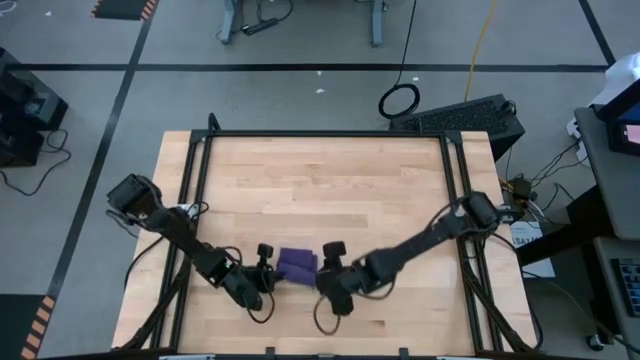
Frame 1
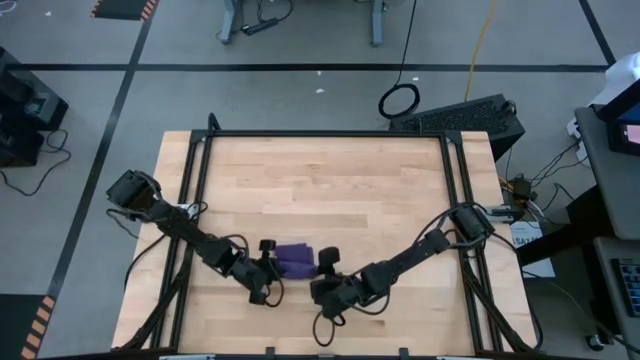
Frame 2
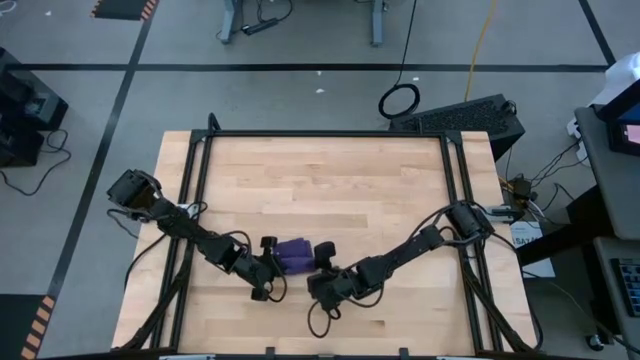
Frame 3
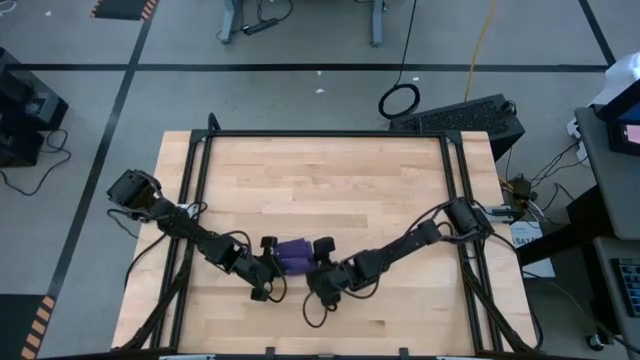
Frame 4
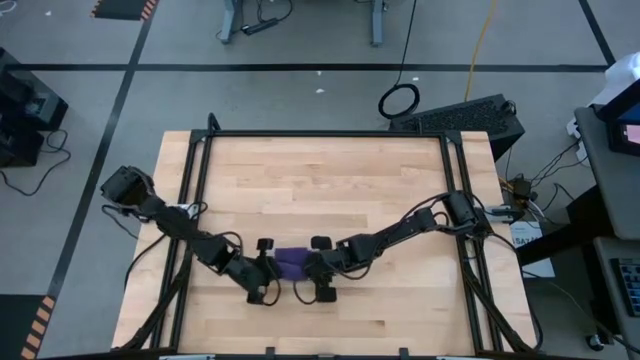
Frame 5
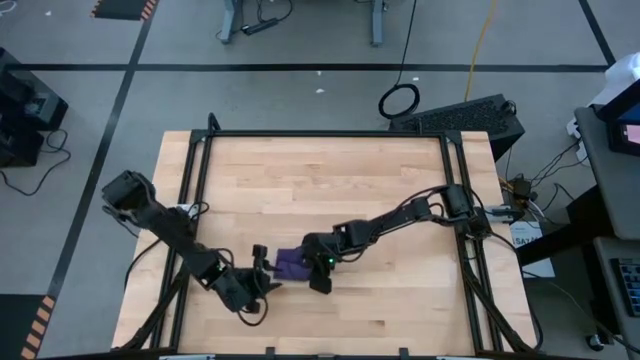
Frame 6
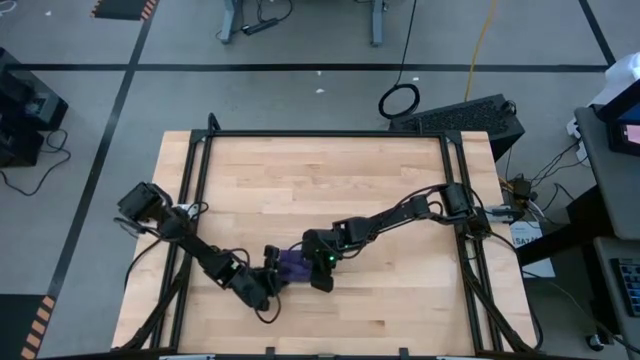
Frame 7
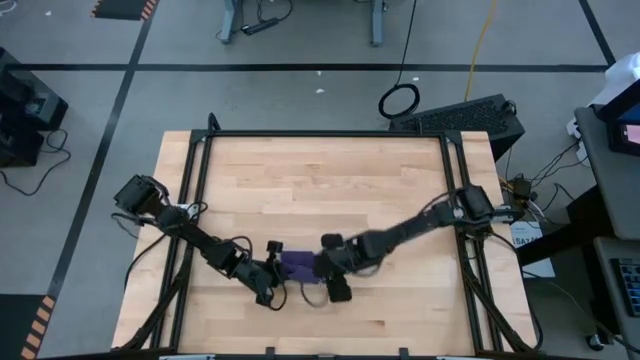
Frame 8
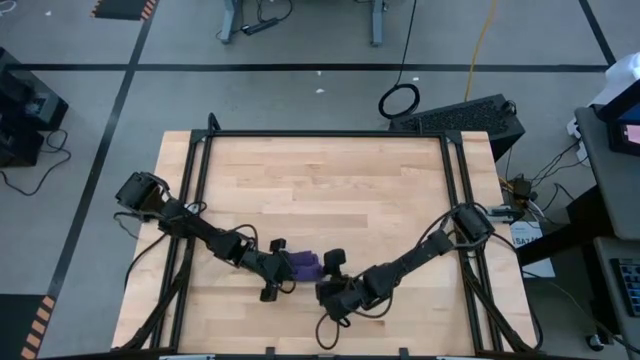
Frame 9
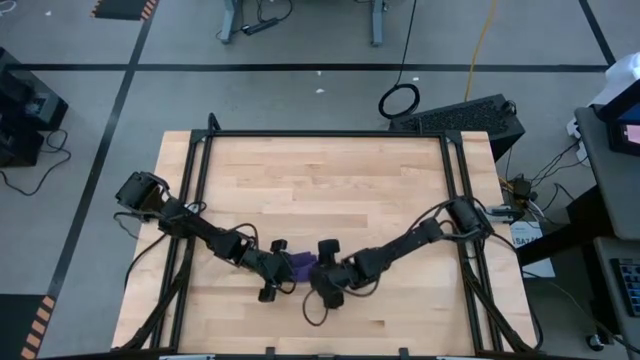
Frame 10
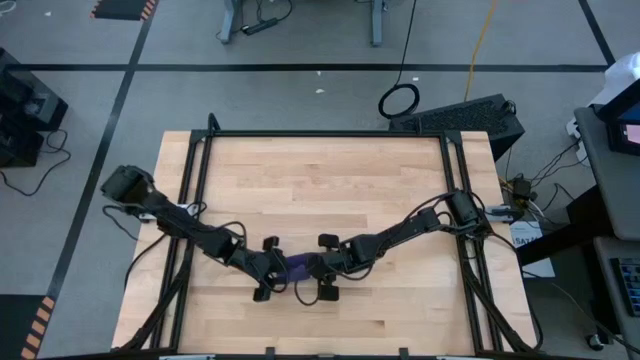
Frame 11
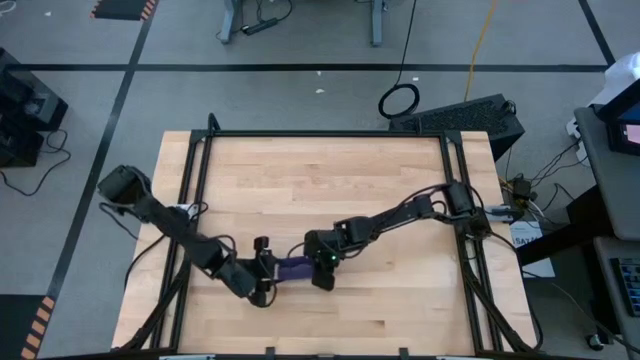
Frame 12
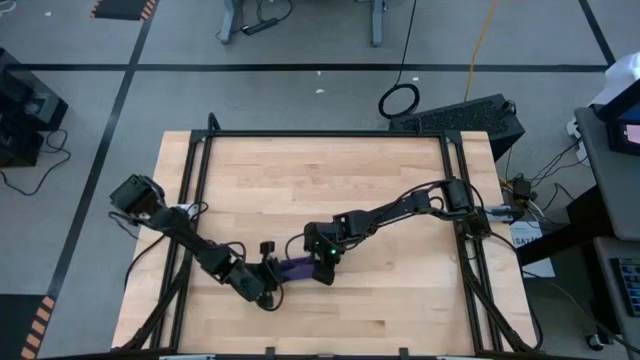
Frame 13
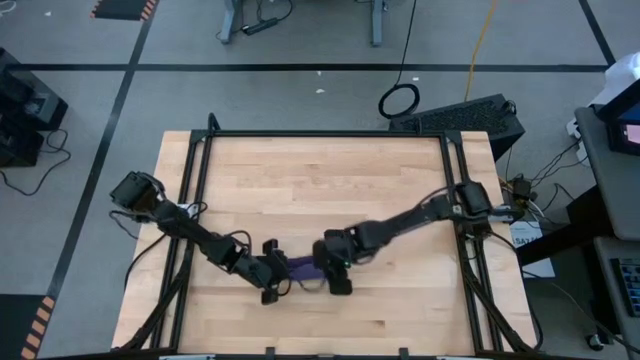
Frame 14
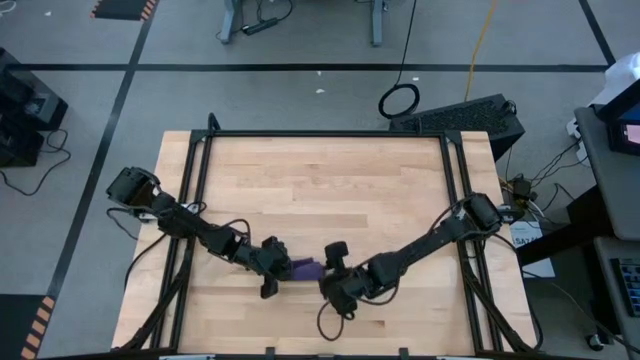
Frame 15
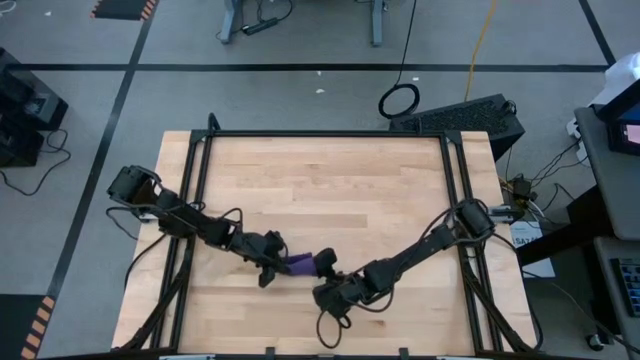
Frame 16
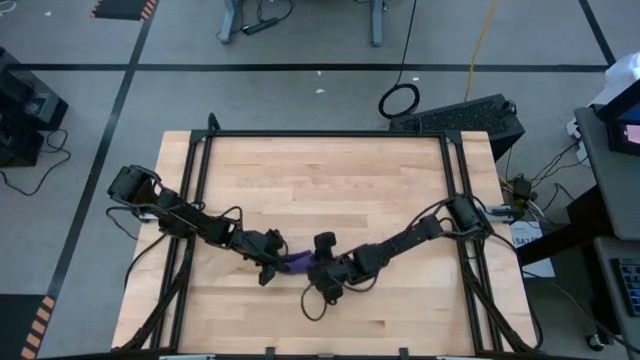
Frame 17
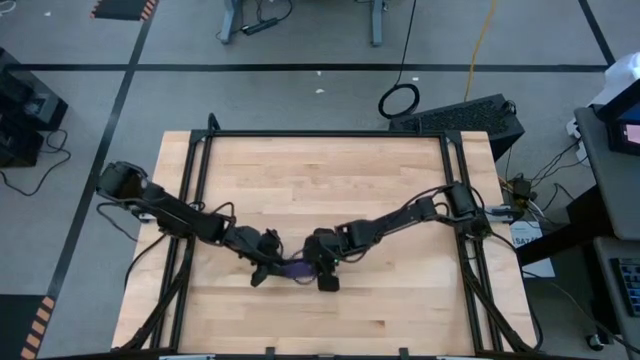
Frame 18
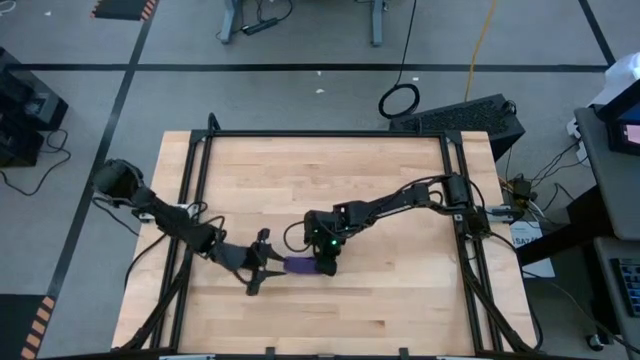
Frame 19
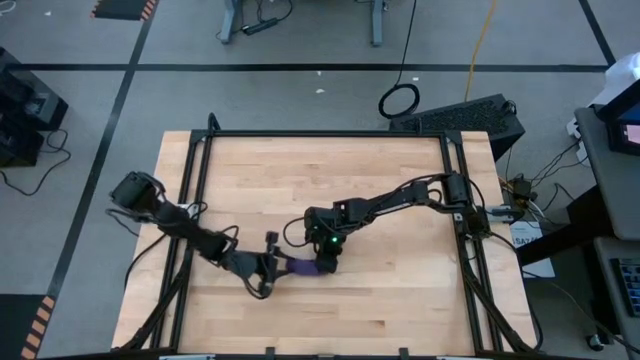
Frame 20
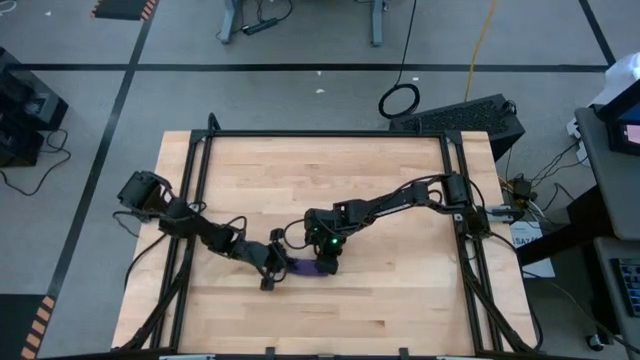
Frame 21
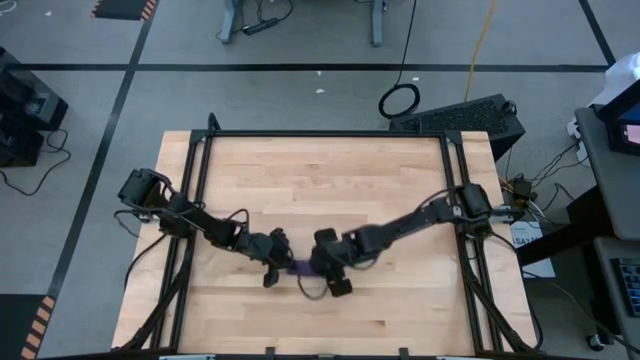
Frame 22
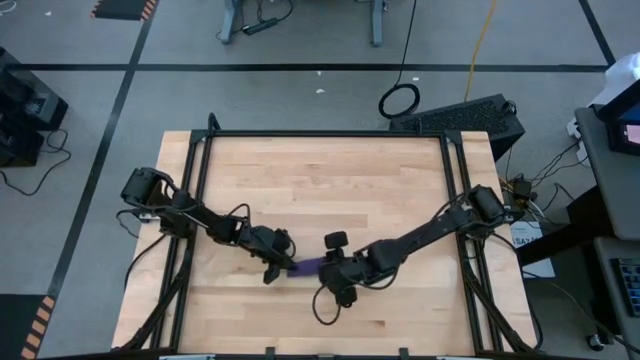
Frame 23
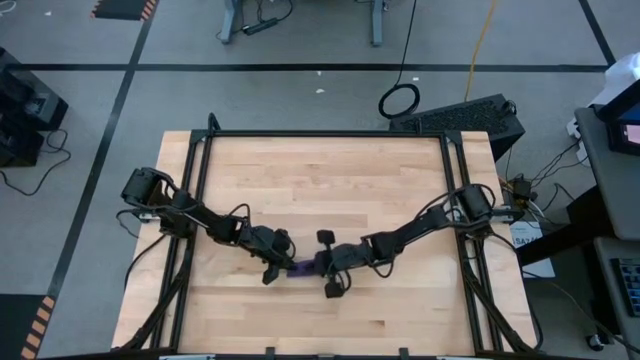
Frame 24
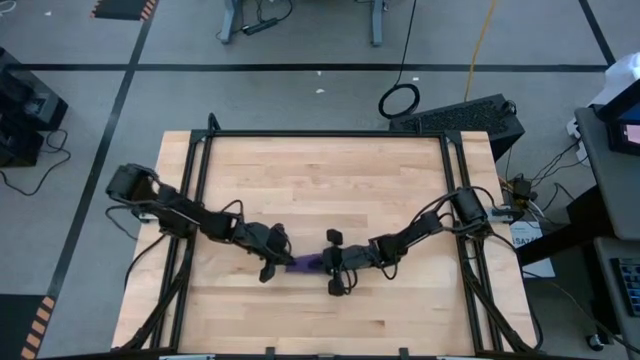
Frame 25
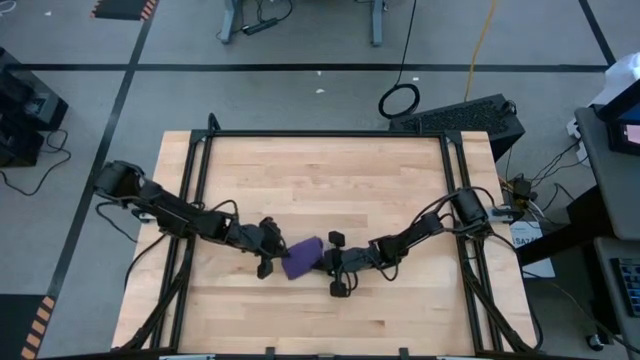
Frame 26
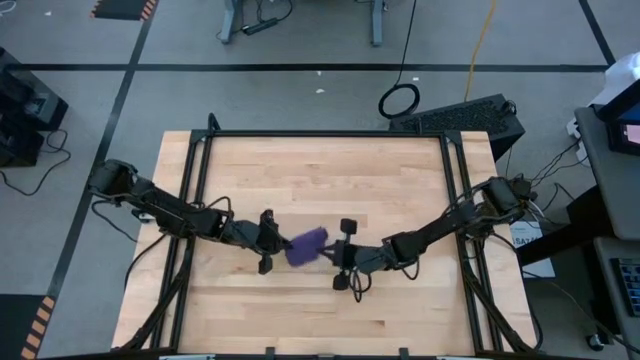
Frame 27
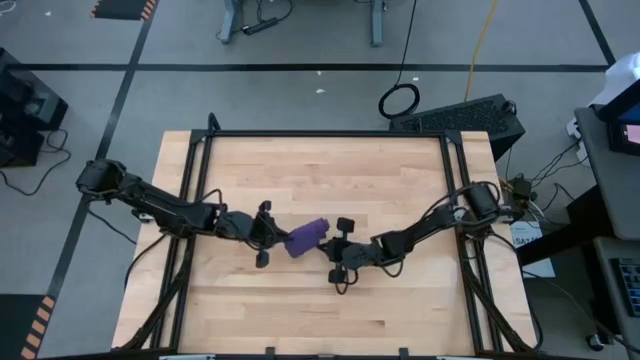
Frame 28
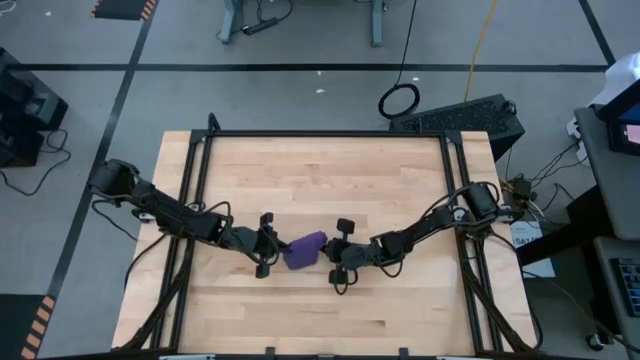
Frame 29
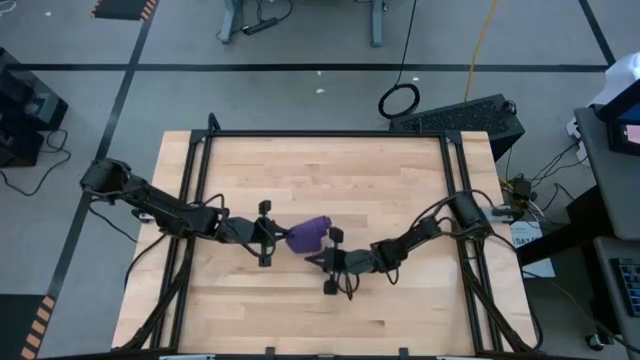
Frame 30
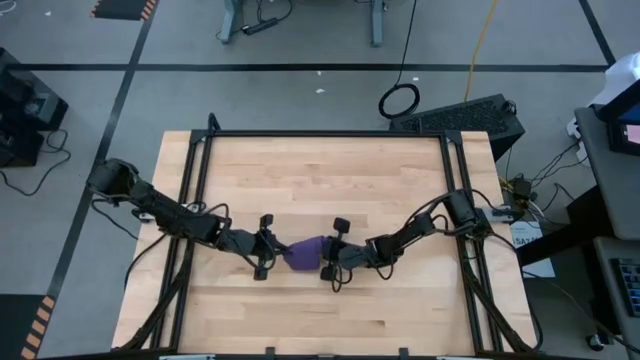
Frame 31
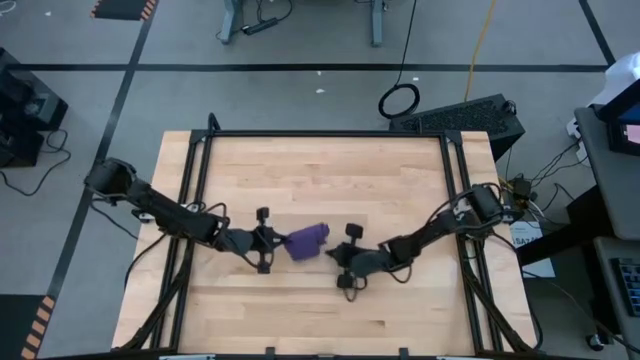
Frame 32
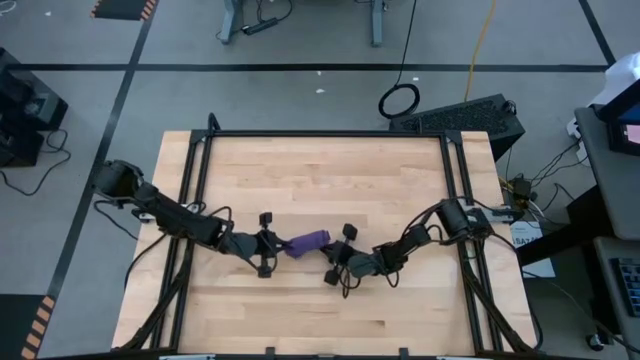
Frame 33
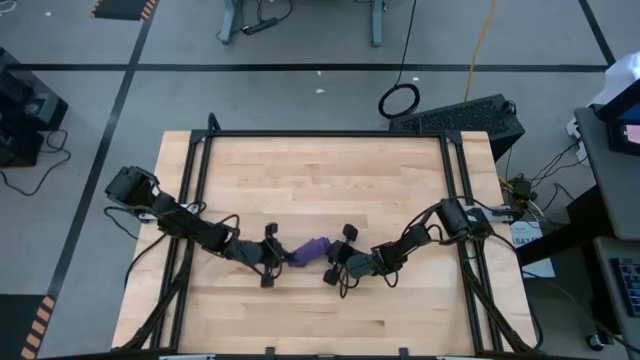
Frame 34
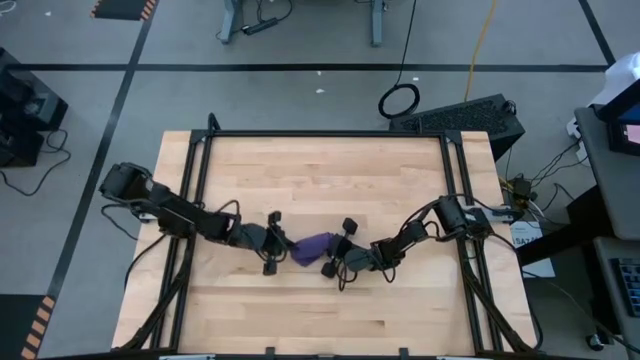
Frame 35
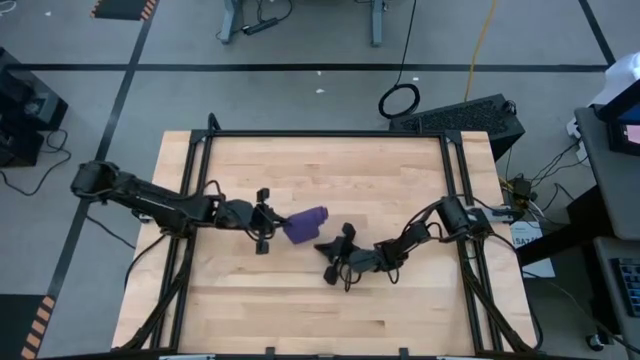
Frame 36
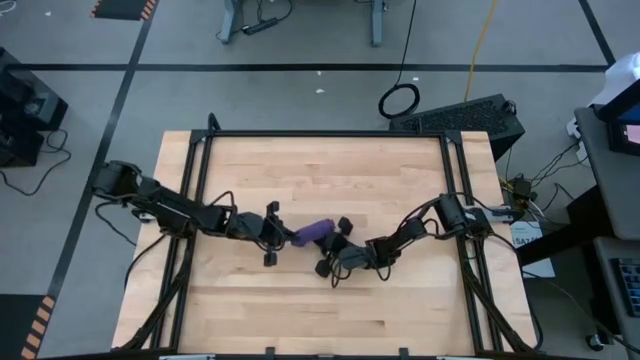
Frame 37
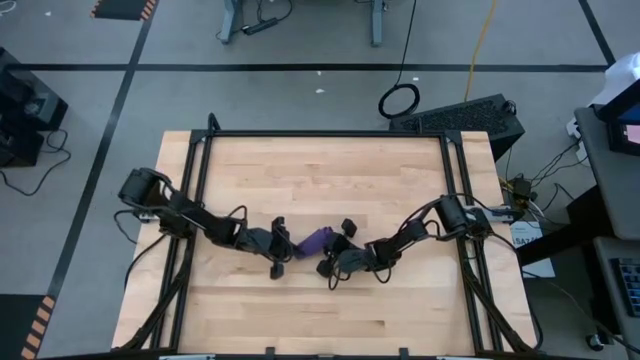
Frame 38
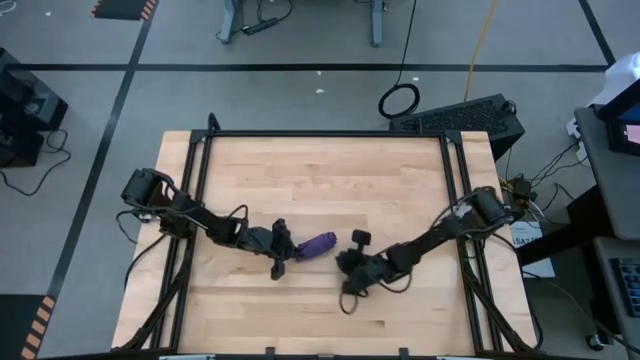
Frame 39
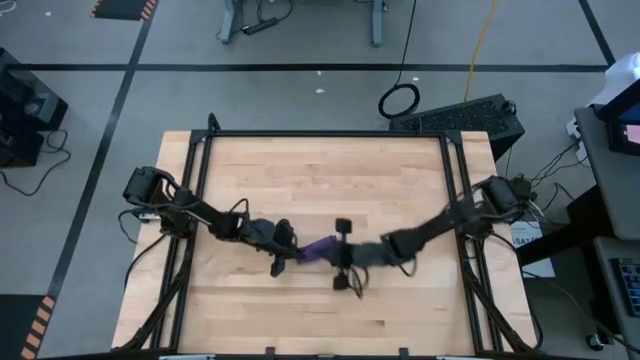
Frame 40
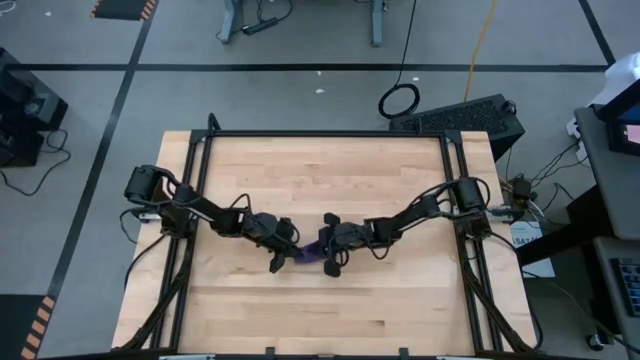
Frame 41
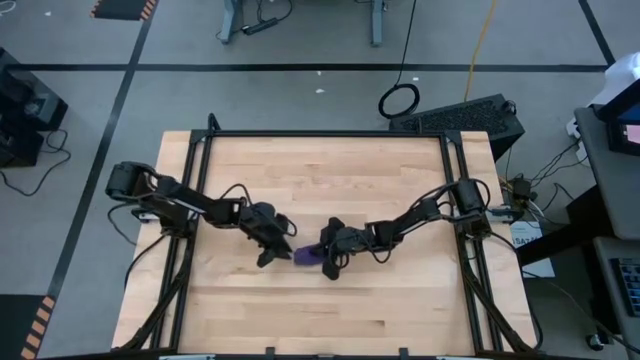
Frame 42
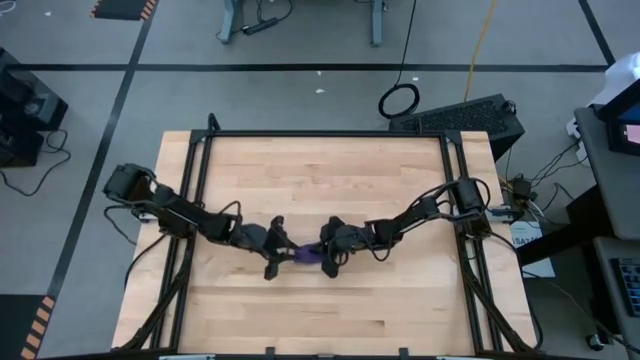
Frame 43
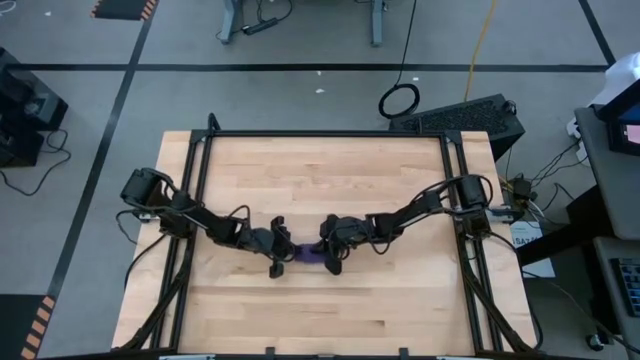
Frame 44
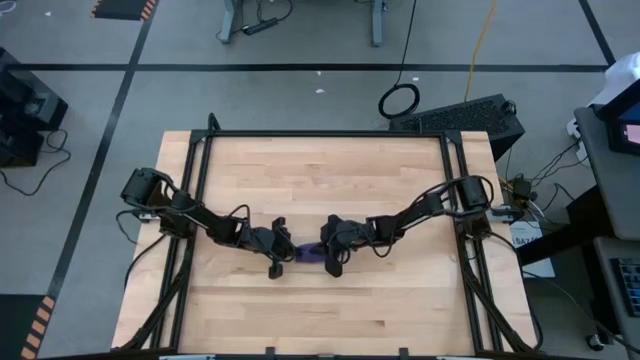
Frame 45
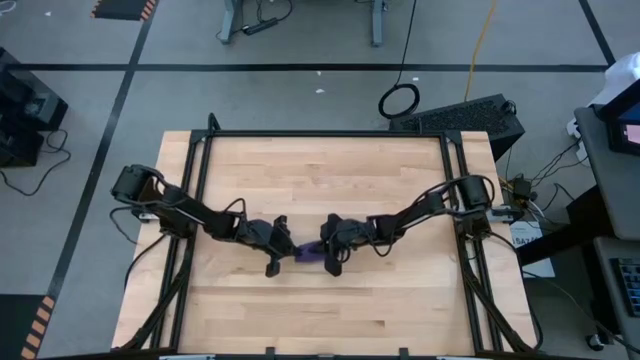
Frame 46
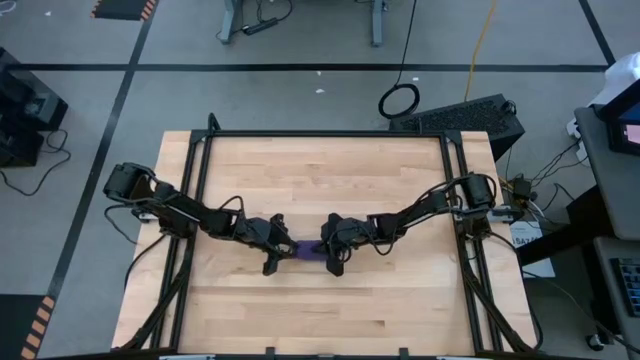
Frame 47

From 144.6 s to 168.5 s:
Task: Roll towel into tight, uniform cylinder
Roll the purple towel on the table
